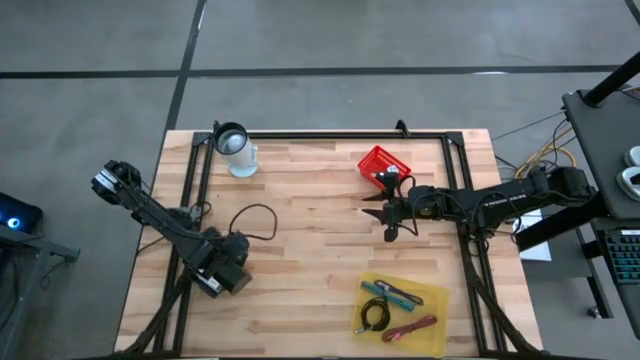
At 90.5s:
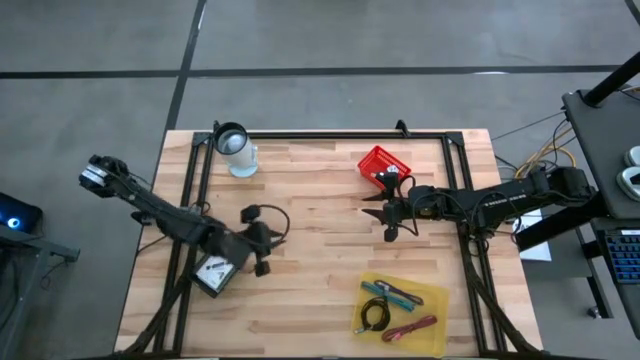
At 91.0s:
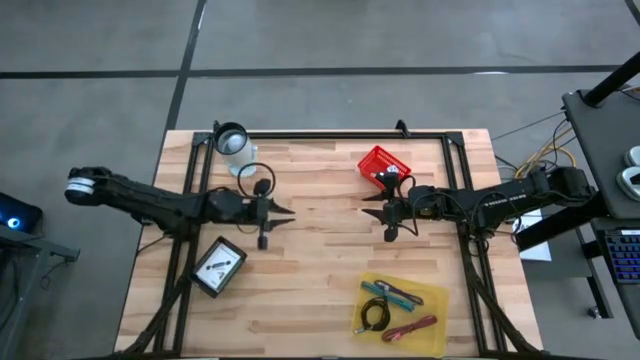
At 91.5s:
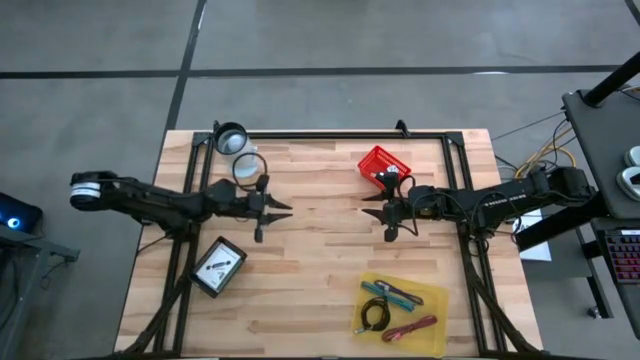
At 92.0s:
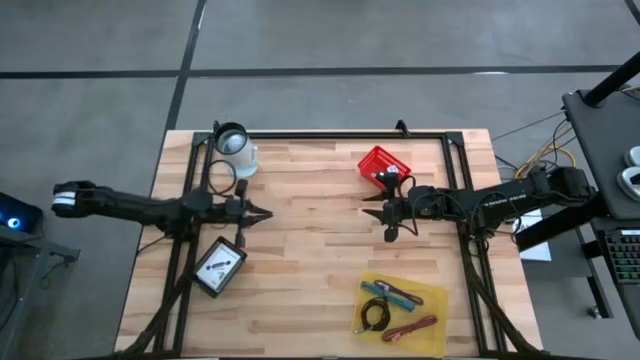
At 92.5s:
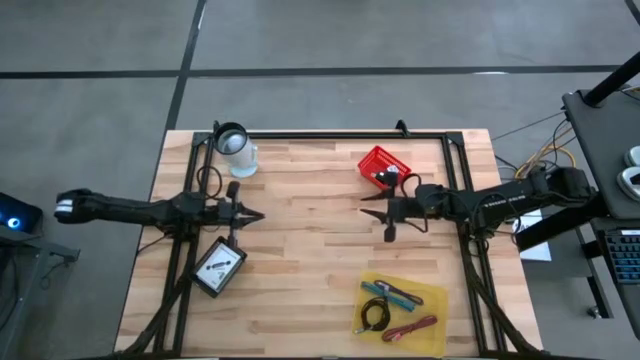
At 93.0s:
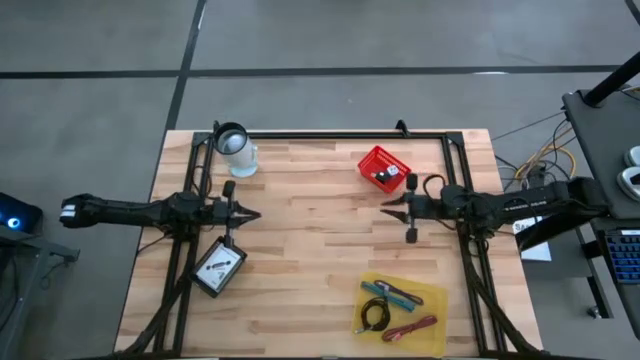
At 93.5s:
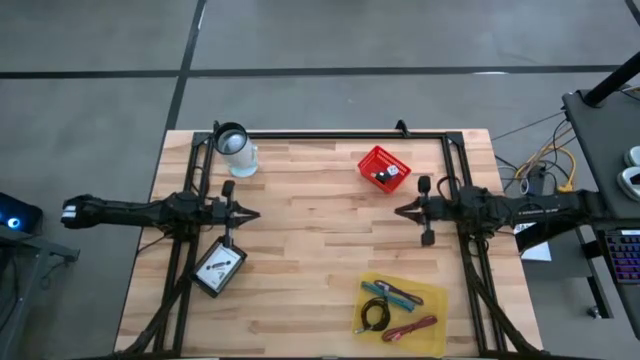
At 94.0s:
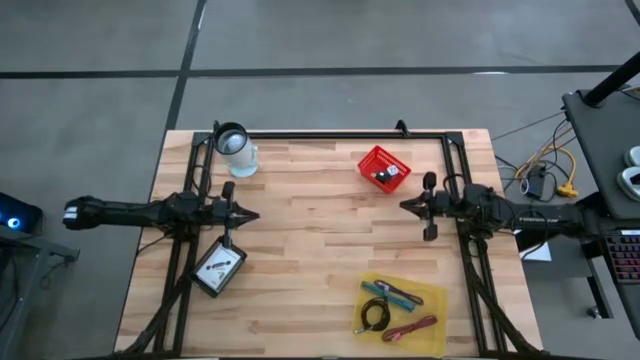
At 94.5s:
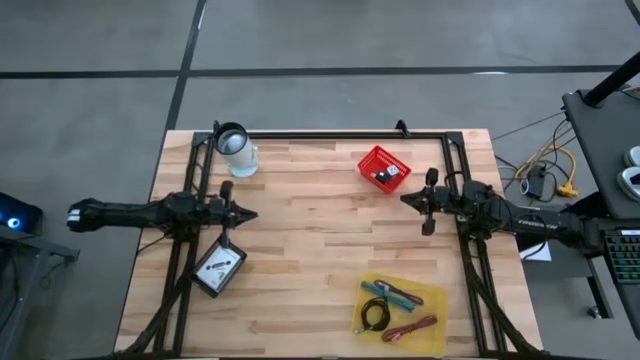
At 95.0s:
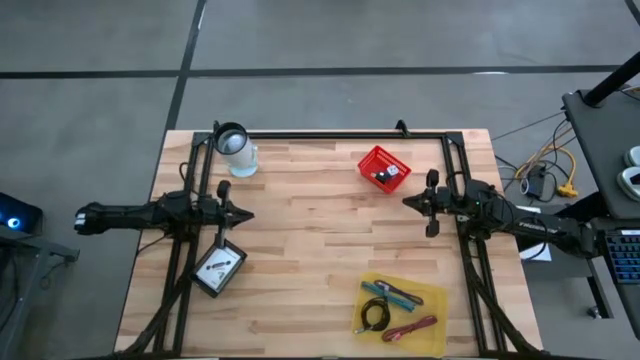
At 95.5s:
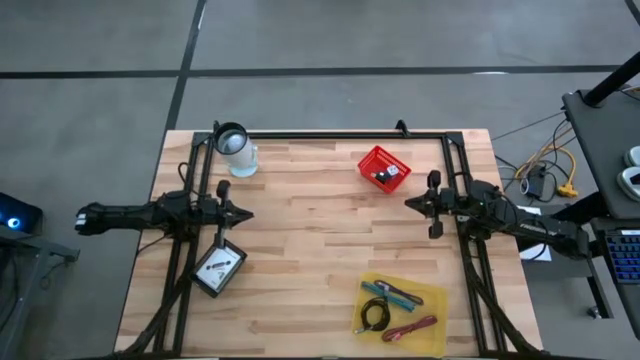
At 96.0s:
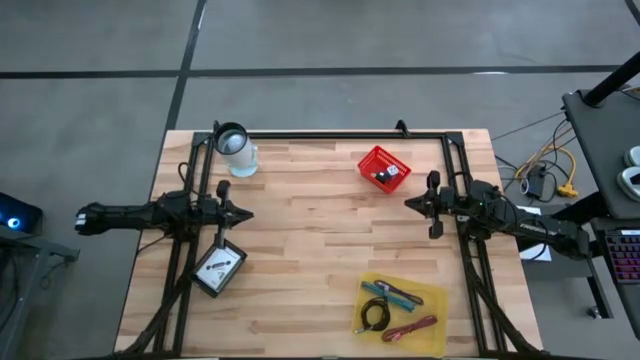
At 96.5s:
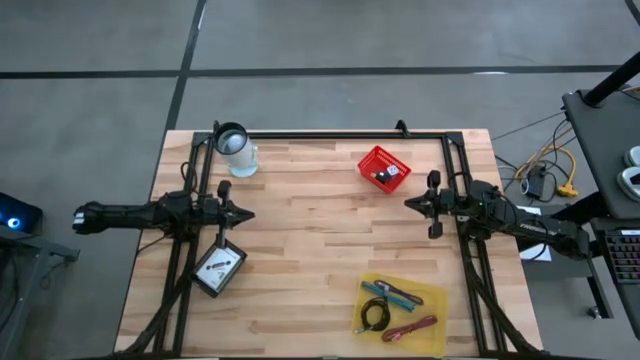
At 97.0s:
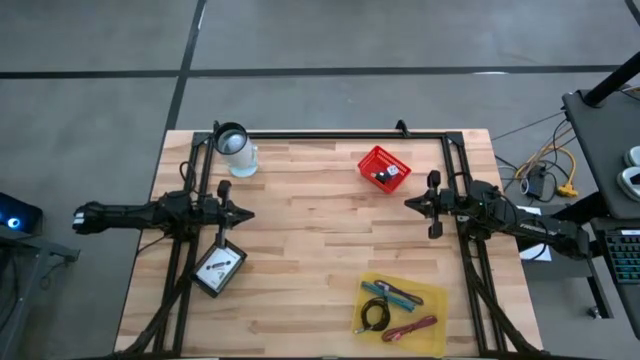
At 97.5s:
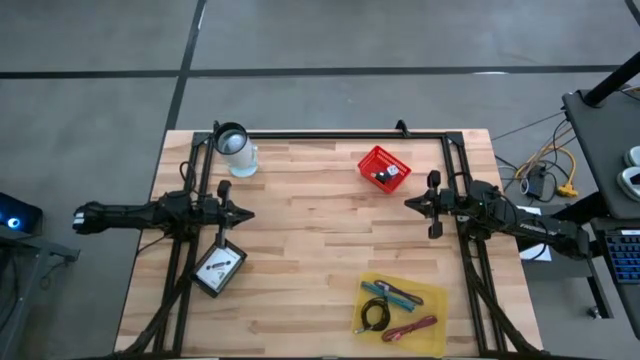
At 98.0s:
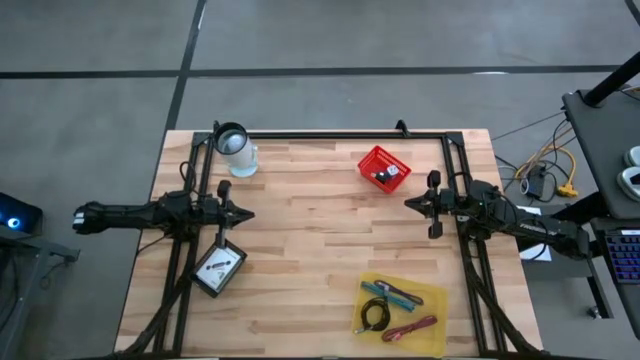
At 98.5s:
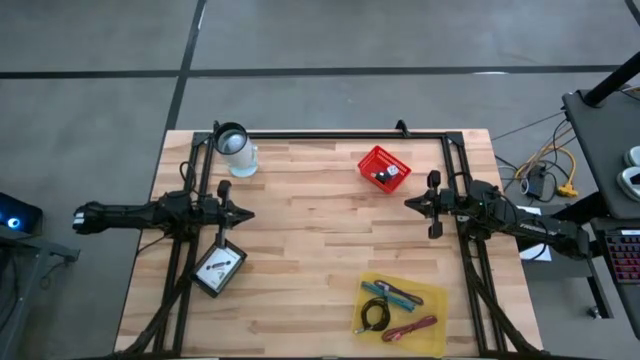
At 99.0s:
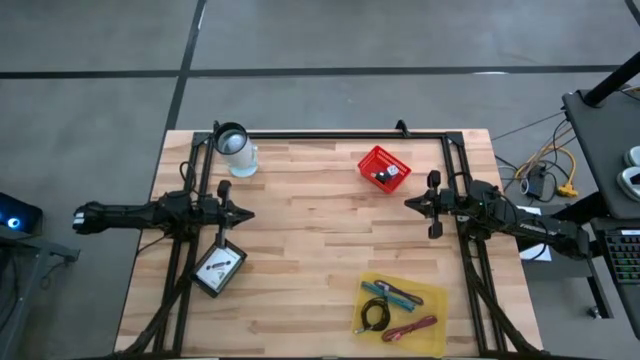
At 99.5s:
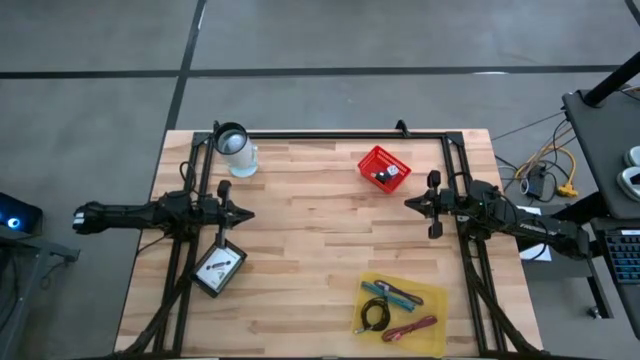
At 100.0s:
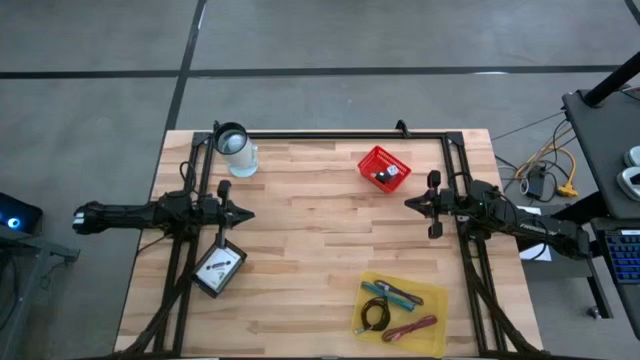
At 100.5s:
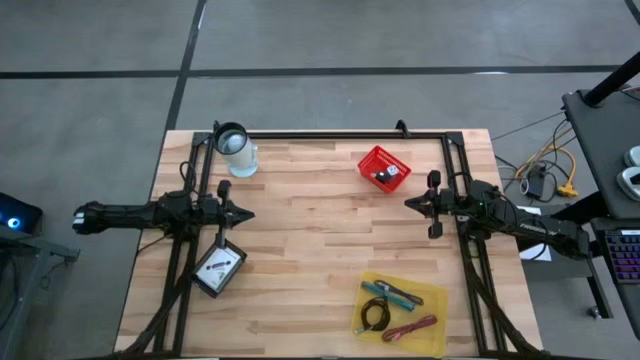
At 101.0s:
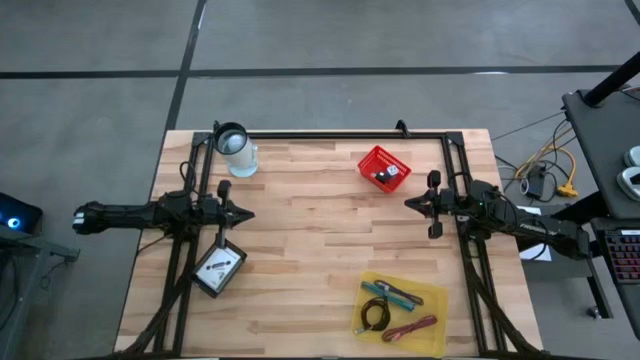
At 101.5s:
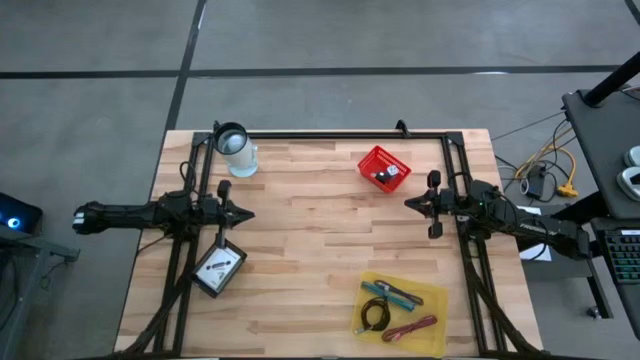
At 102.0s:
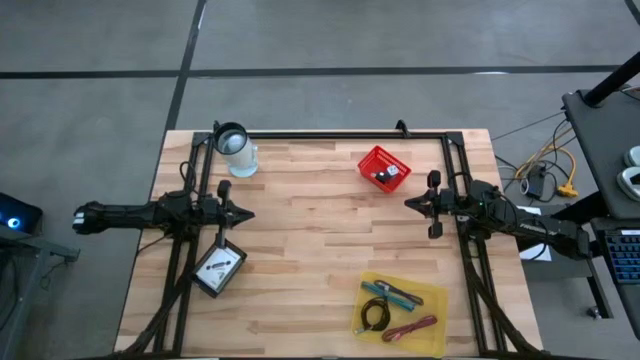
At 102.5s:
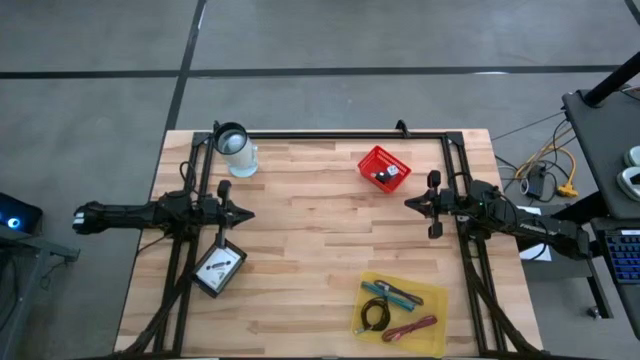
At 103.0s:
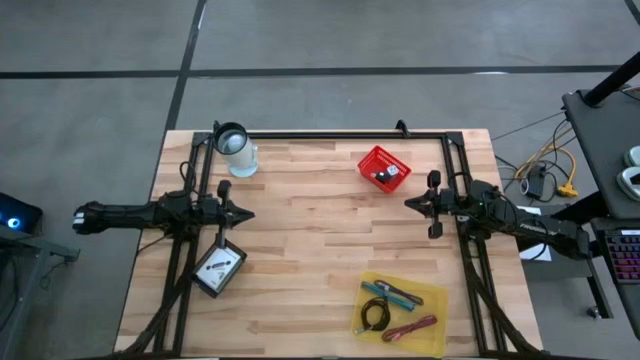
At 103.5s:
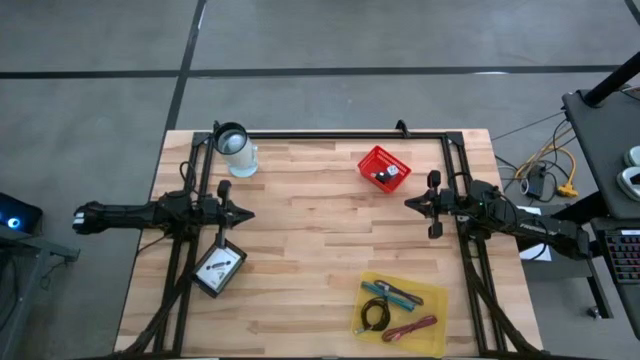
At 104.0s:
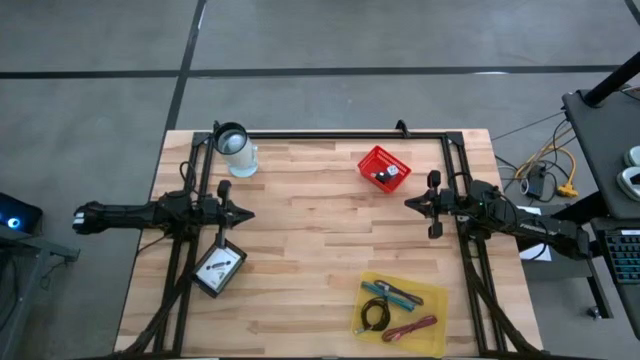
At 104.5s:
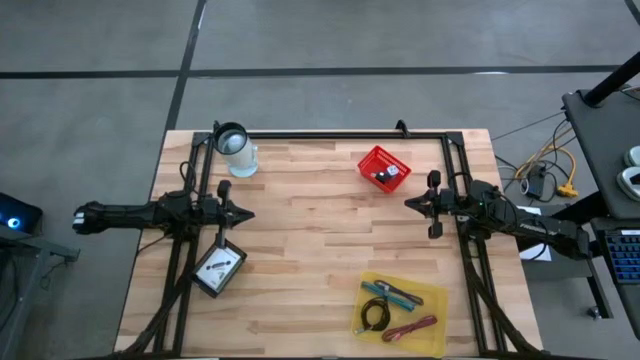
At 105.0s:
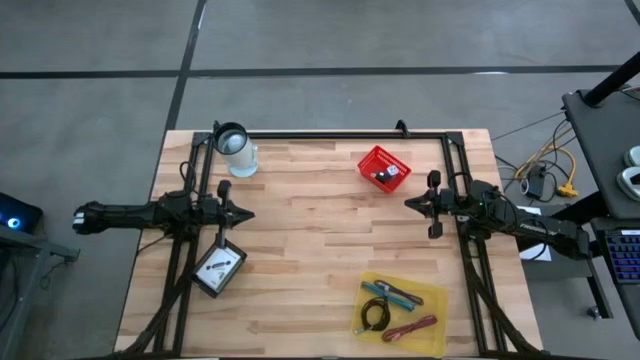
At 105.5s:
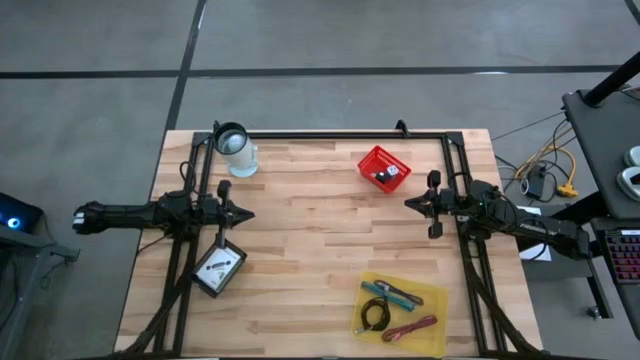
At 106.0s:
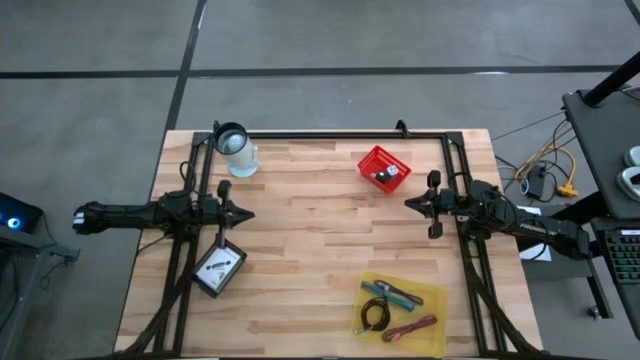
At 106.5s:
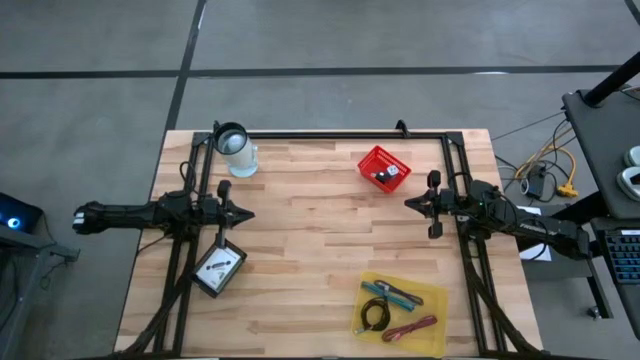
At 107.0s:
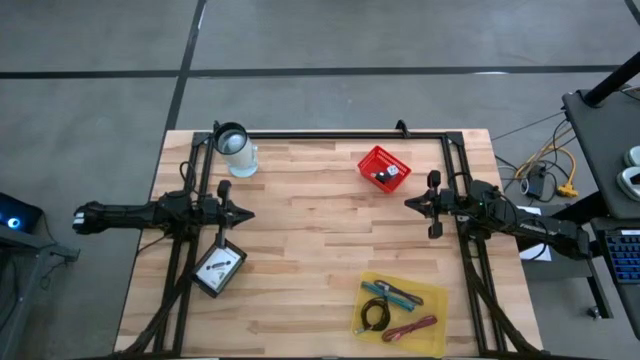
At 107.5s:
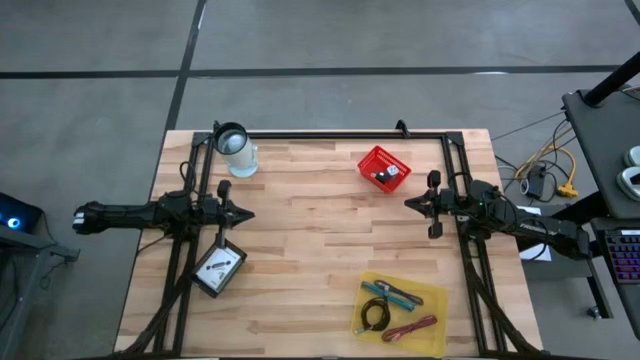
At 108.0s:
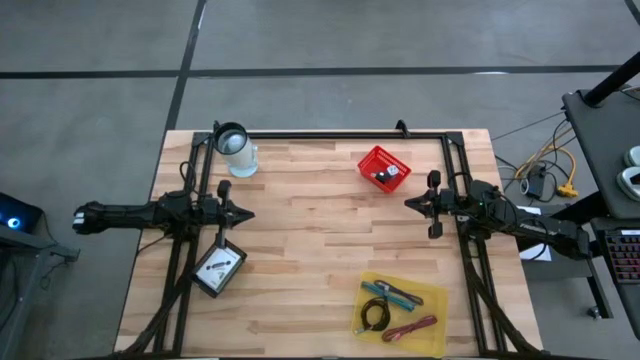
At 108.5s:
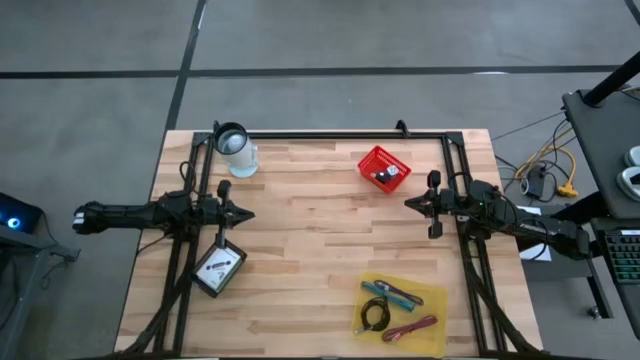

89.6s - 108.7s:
Task: Pick and place items into bin
Return to Home Position

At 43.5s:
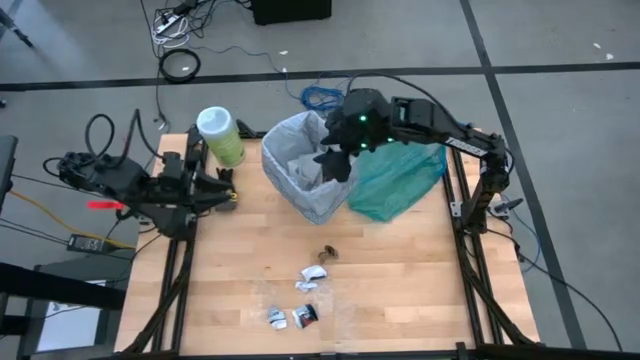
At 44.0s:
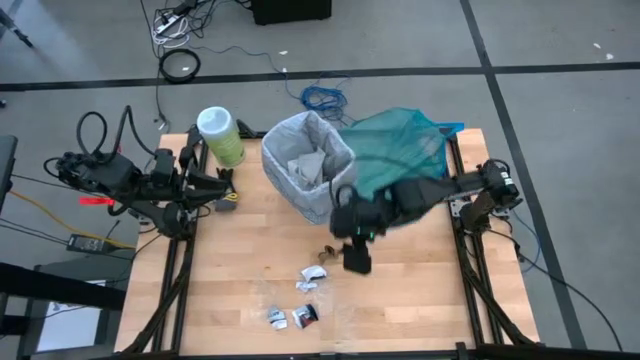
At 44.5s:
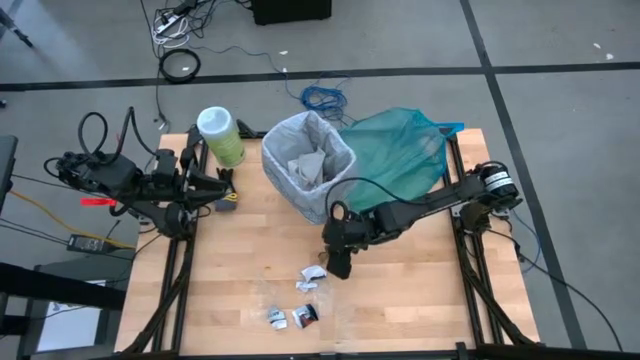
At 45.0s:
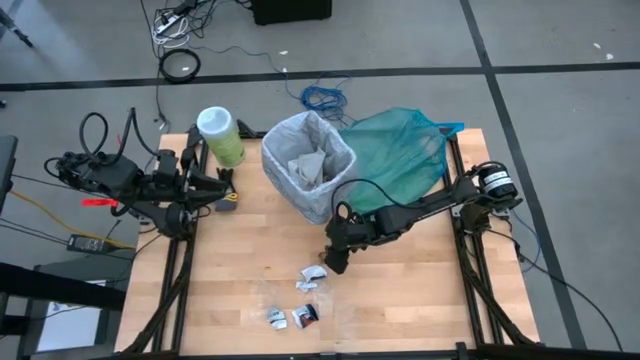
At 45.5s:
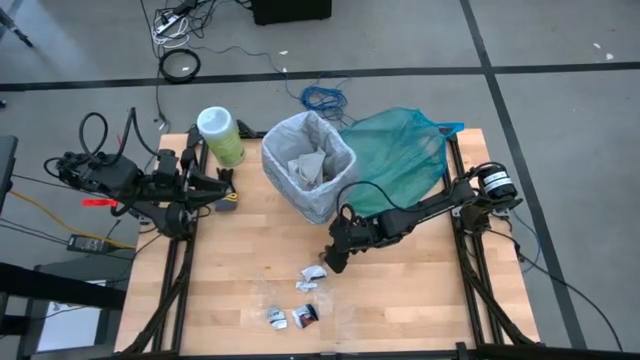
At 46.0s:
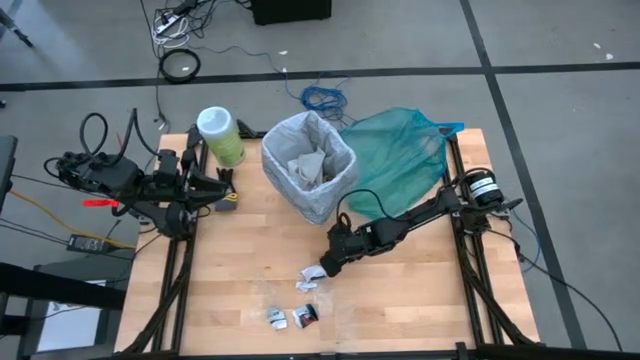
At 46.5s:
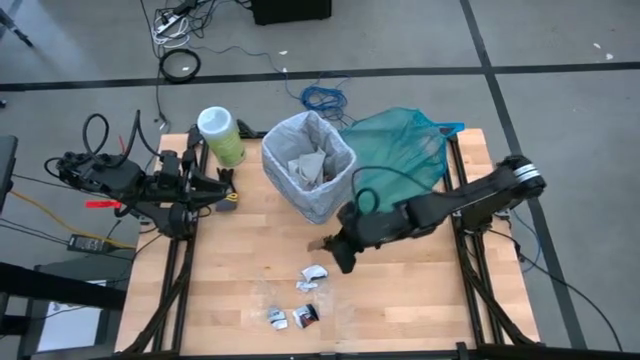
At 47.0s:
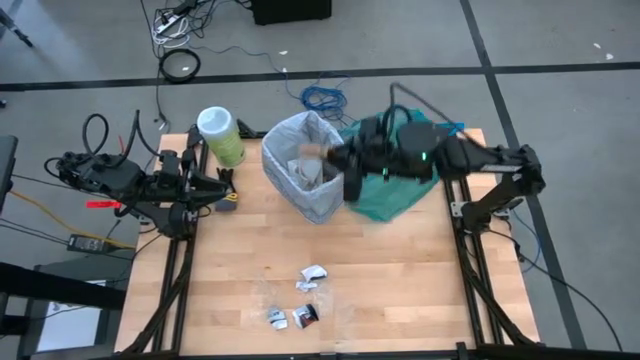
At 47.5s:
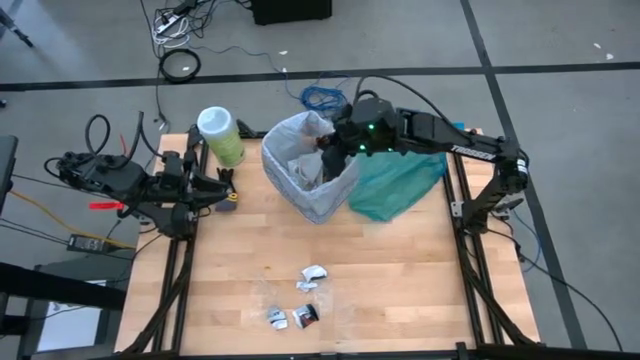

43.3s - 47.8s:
Task: place trash/remove bag and relplace
Put the brown cardboard piece into the trash bin
